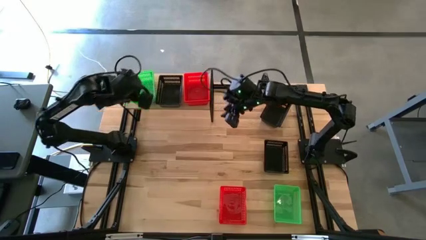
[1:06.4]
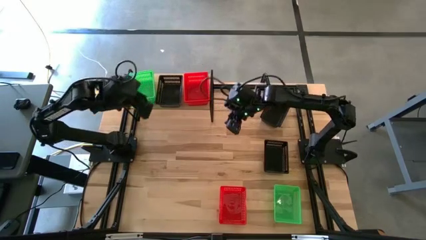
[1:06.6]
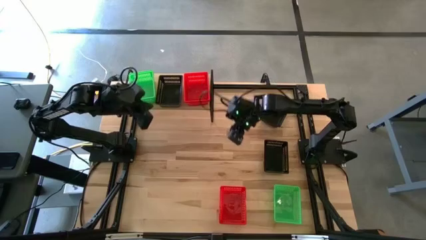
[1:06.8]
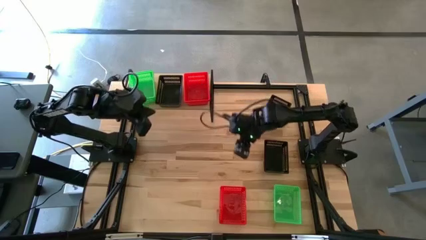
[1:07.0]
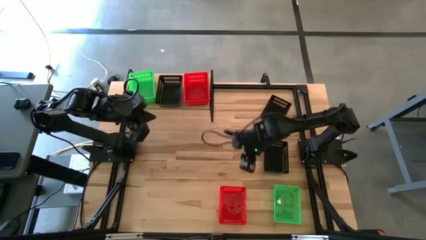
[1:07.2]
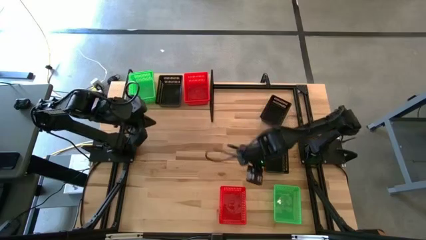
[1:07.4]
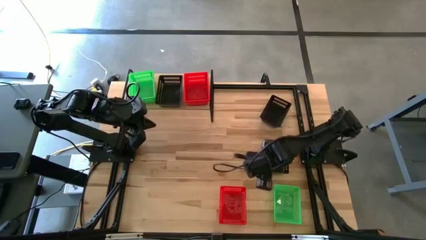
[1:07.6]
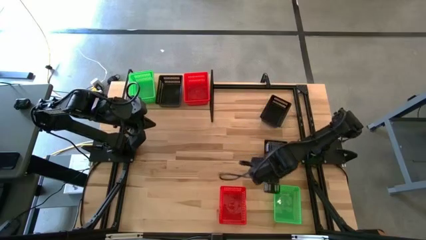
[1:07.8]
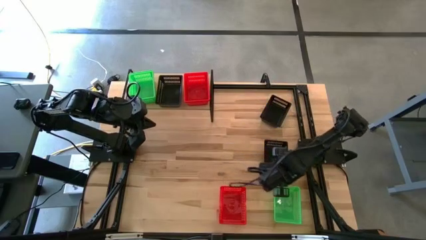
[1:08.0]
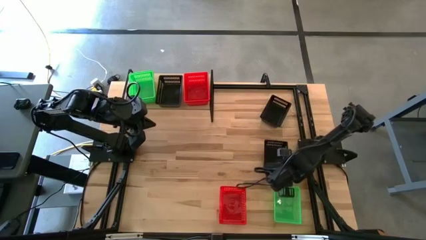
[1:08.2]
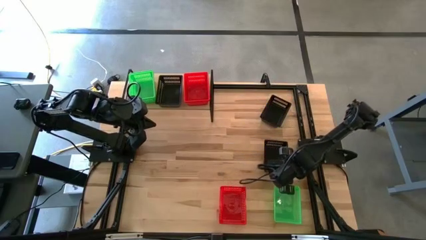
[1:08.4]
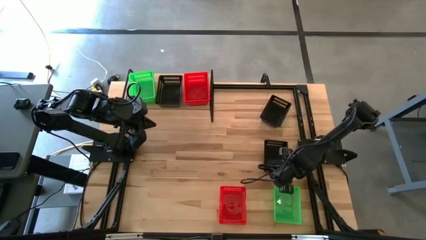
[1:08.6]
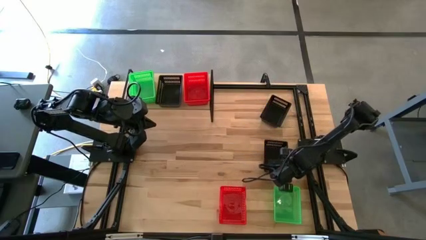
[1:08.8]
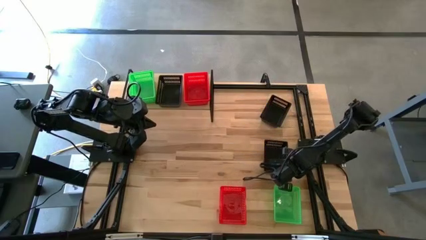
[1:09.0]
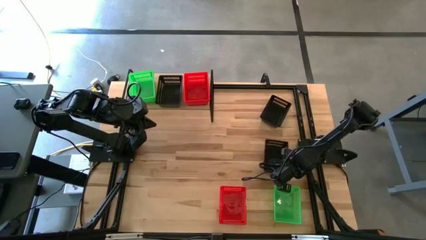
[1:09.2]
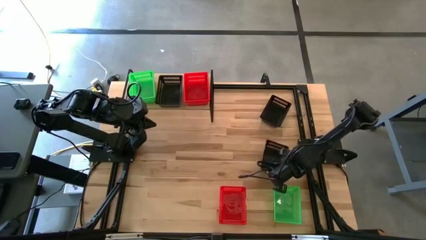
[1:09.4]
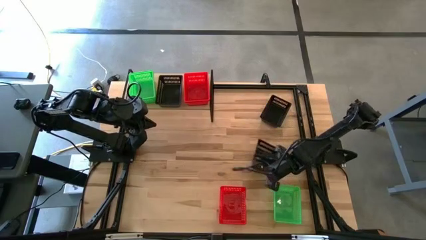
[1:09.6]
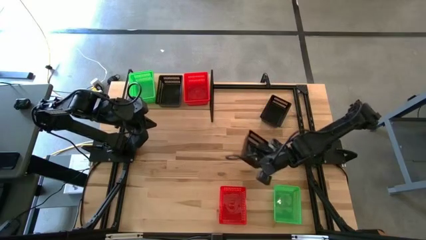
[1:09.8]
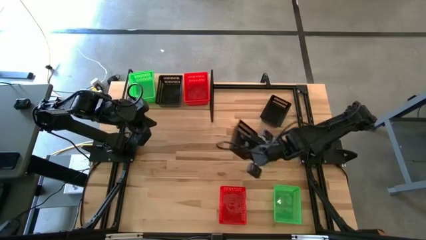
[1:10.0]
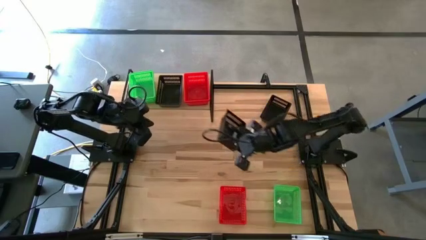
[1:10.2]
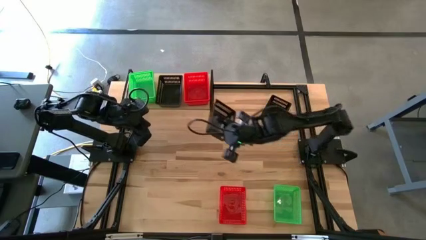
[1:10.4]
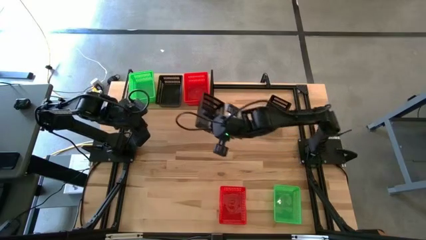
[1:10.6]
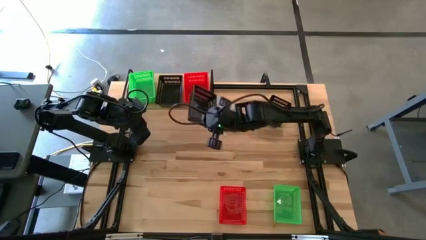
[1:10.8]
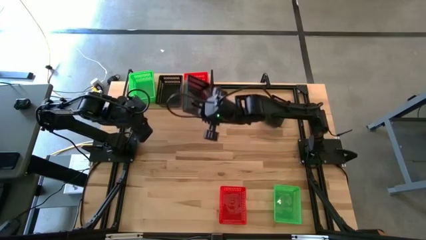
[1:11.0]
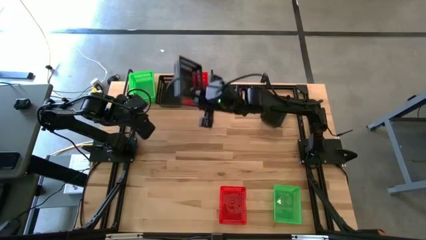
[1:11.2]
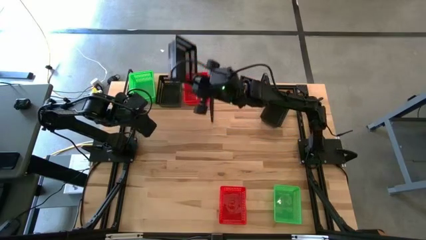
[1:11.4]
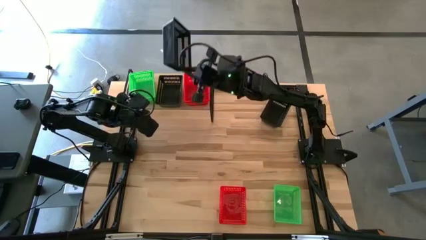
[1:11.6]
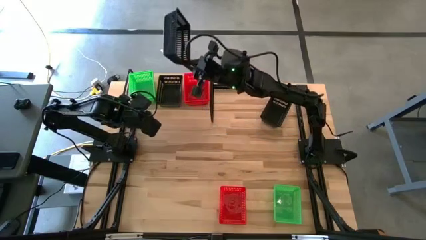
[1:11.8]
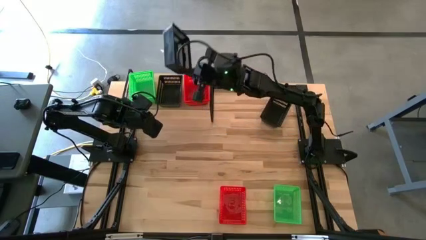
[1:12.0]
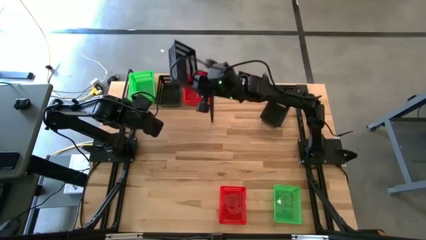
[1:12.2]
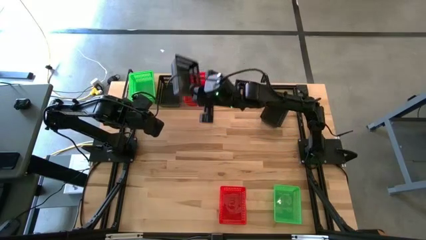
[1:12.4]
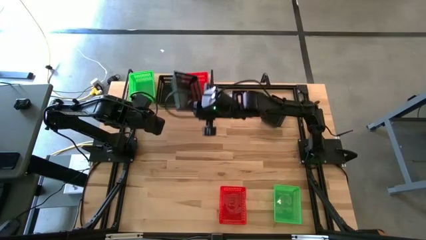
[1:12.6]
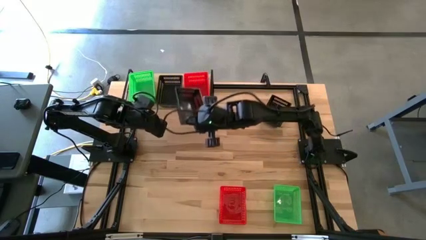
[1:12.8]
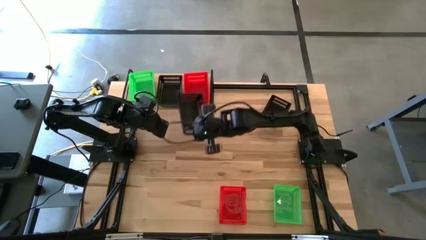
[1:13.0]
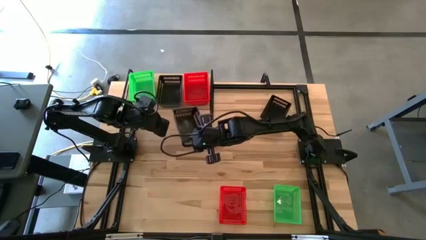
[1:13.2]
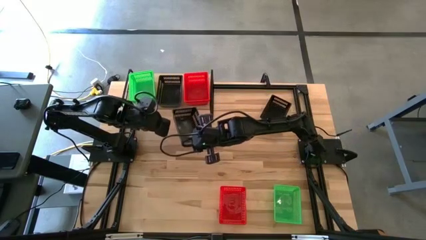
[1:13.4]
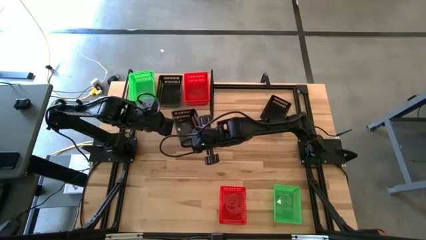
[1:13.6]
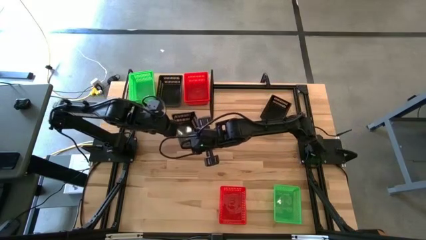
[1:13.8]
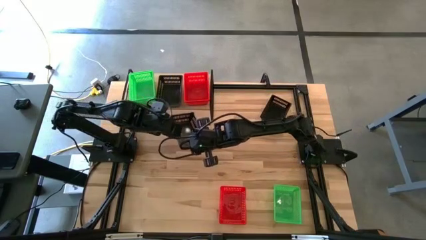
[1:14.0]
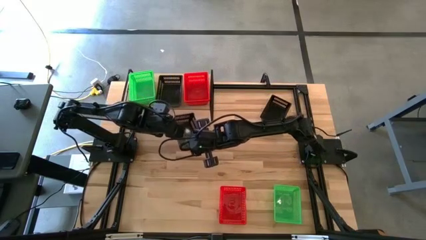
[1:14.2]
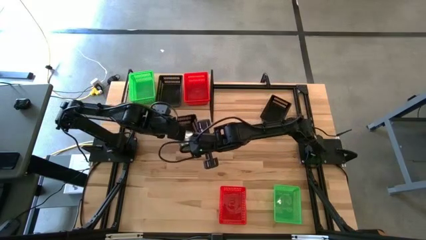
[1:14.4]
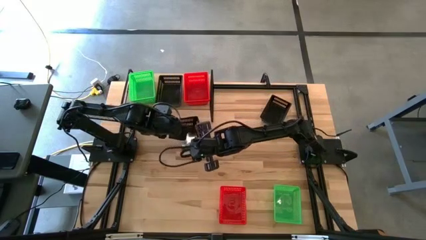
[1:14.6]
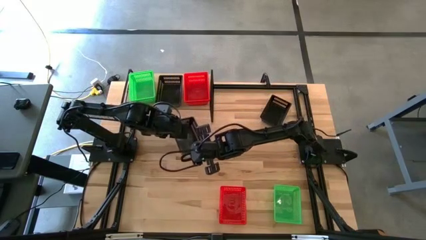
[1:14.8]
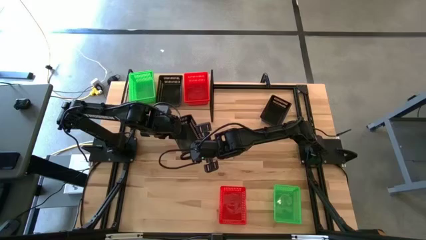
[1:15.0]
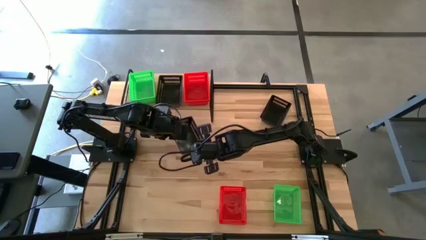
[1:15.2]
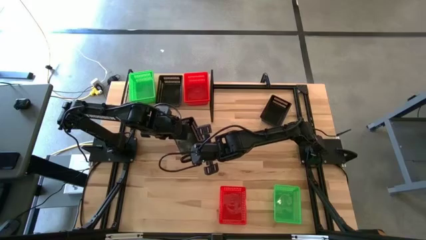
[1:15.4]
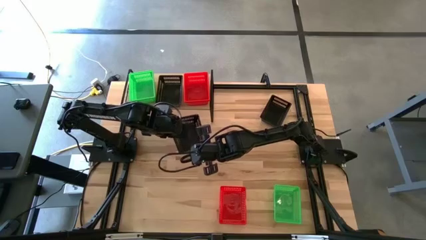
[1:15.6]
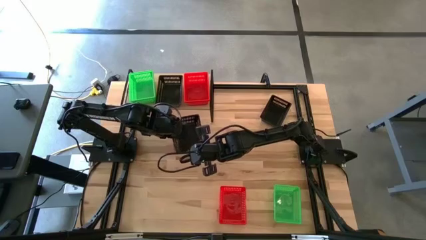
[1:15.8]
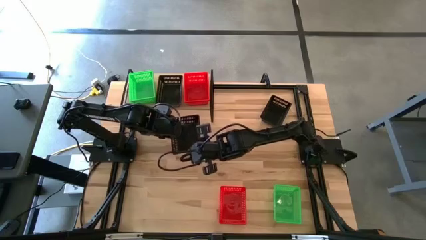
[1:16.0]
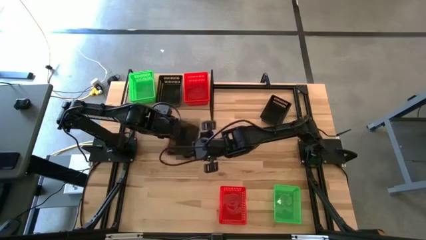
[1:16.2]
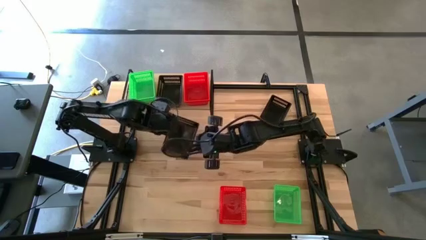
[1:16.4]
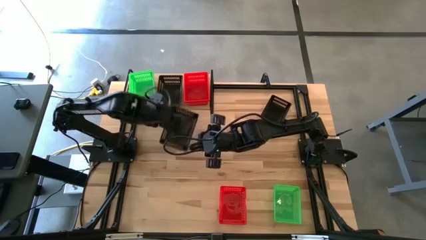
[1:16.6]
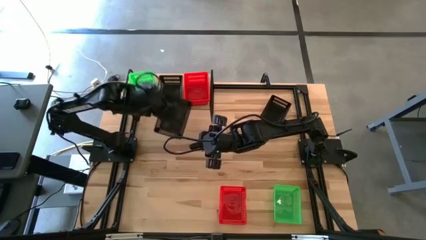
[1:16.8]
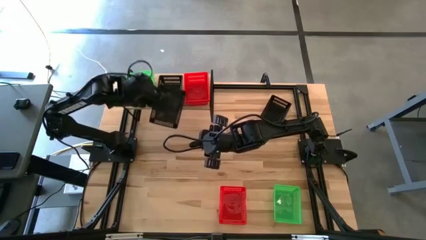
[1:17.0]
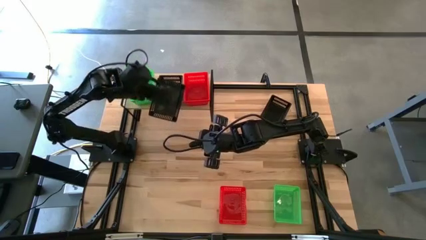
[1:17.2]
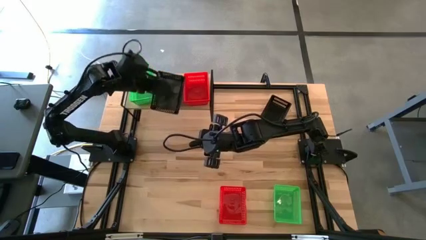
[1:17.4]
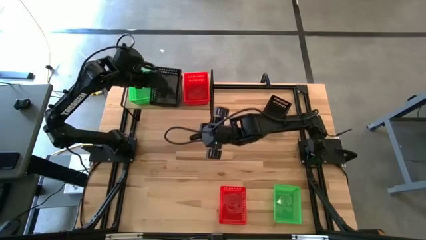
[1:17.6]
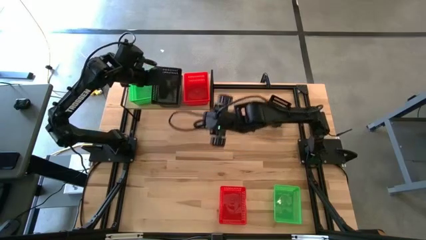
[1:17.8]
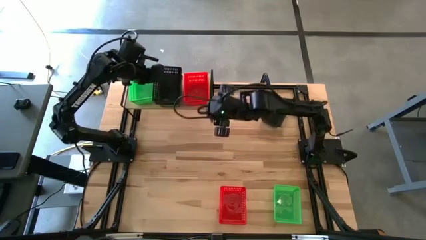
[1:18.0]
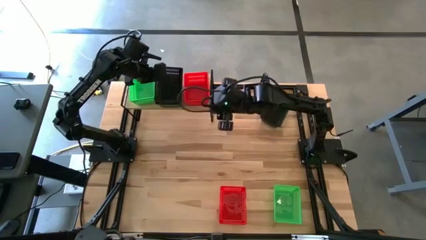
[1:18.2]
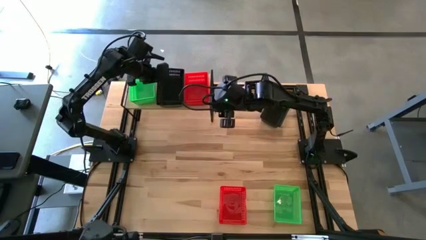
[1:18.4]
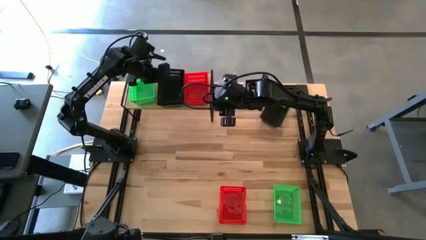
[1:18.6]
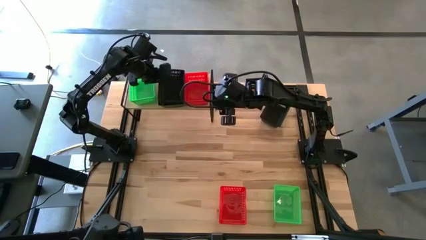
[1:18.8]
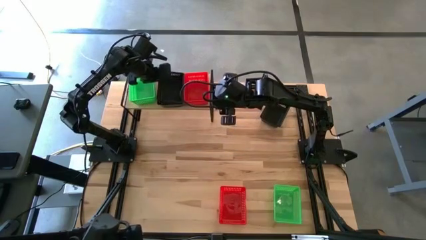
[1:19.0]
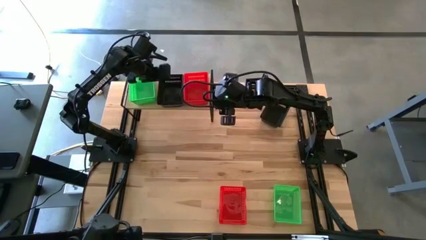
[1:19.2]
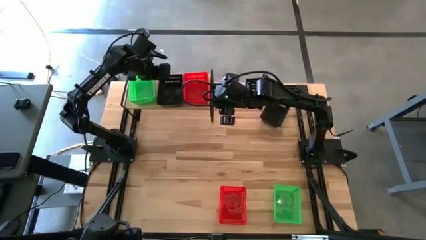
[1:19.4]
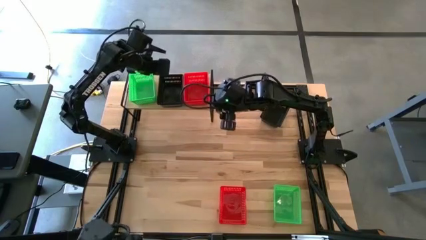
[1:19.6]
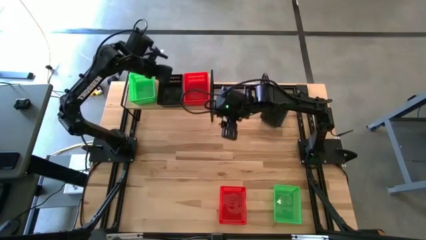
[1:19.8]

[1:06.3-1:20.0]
Task: Stack baskets on shelf by color
Stack the bottom black bin on top of the black bin on the shelf

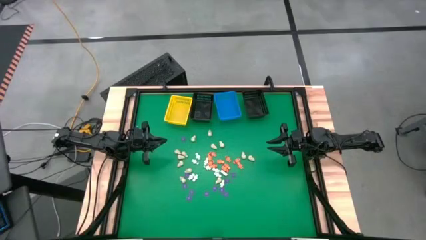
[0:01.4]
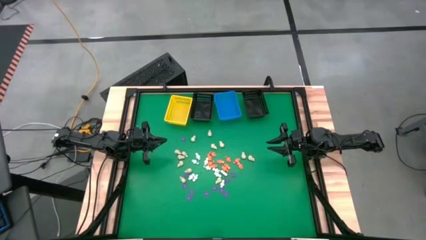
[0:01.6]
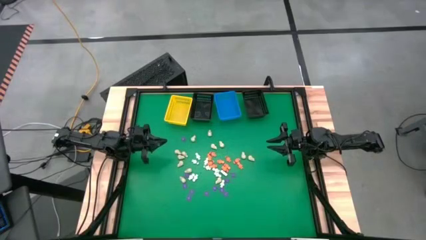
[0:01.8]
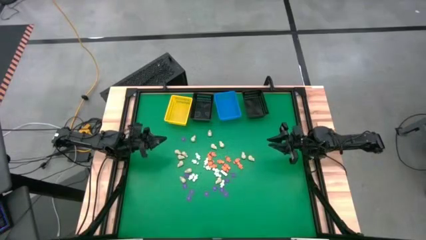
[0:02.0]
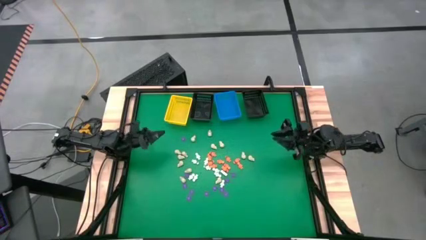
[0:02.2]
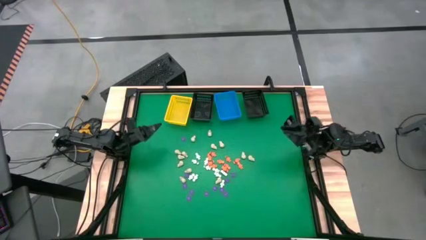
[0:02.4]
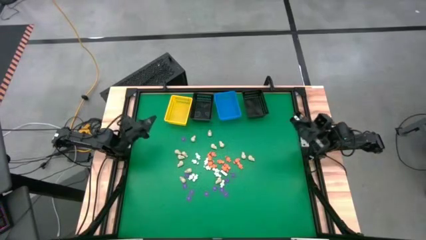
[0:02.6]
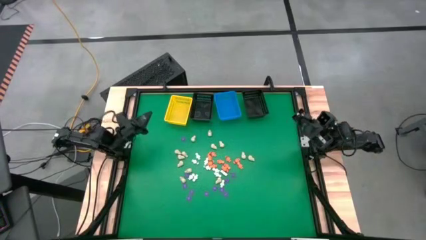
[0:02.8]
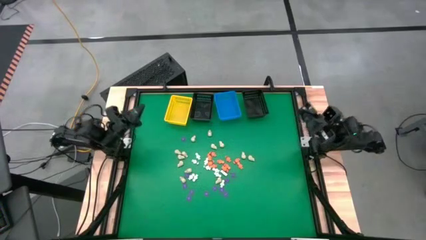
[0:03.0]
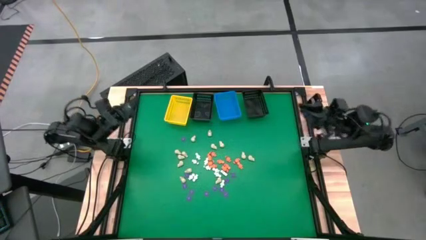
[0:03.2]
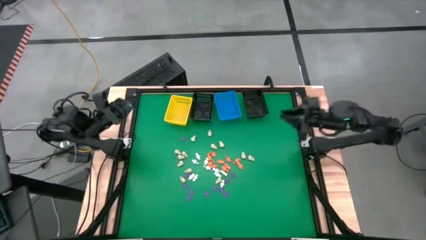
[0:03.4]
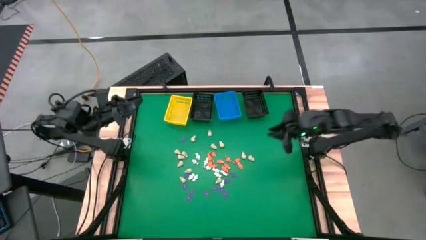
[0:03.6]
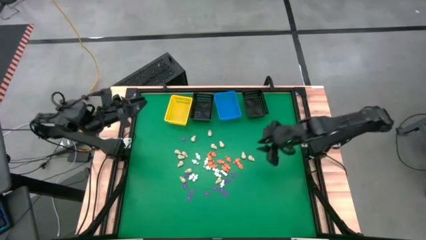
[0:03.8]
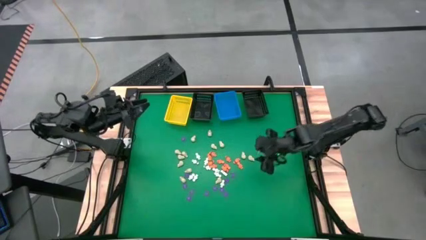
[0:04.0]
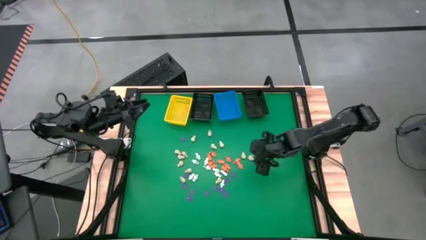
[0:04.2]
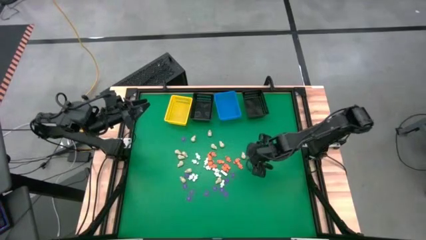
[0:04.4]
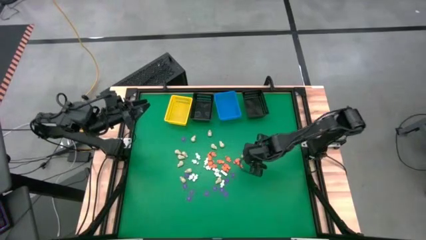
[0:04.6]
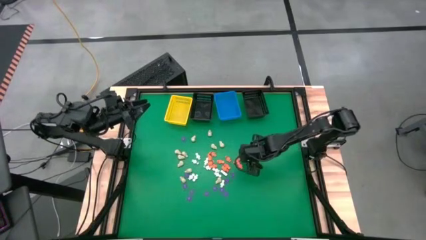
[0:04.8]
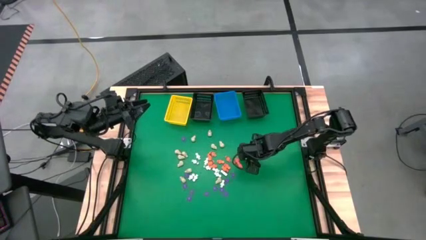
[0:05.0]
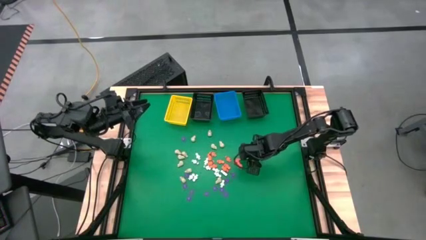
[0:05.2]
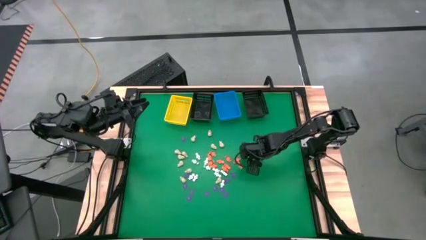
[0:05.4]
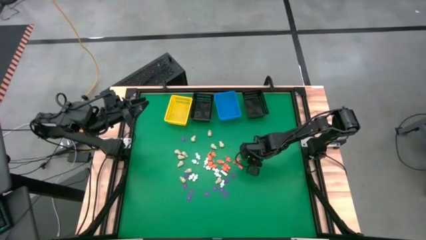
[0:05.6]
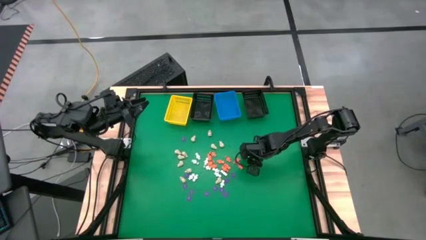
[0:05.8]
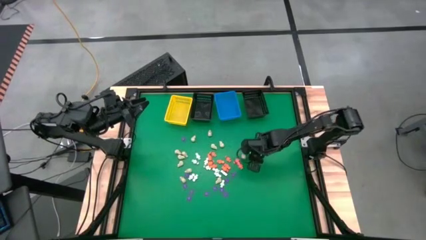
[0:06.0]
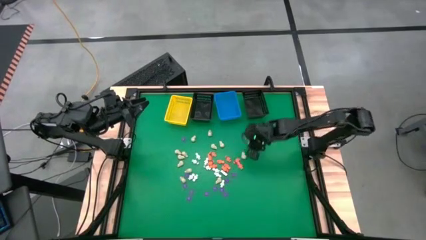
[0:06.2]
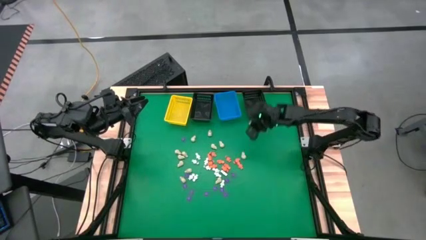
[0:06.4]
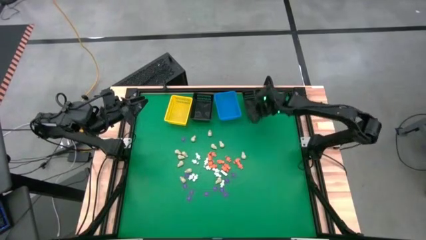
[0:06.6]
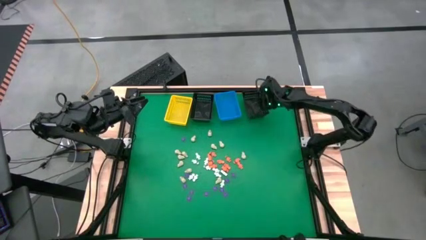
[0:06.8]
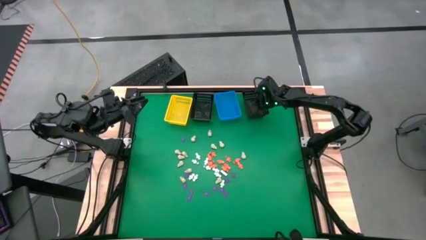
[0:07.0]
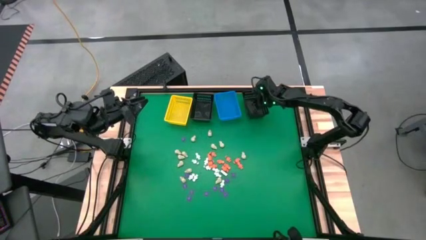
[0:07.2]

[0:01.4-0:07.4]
Task: Sort Halloween decoration
Put the white skull toy into the right black basket
